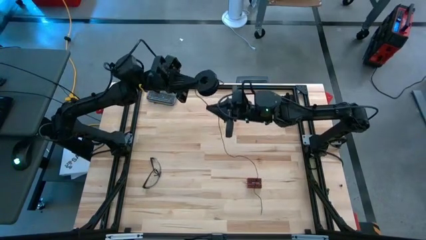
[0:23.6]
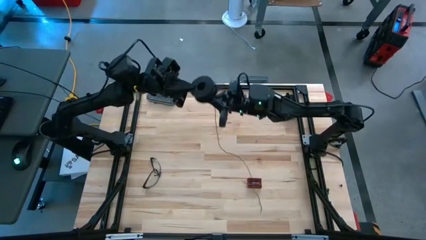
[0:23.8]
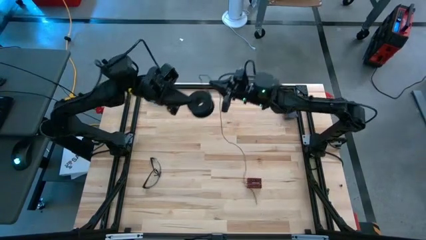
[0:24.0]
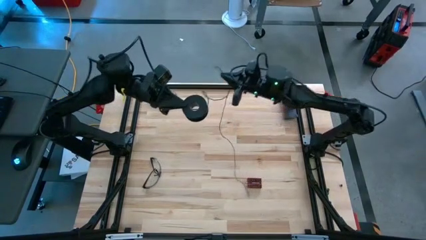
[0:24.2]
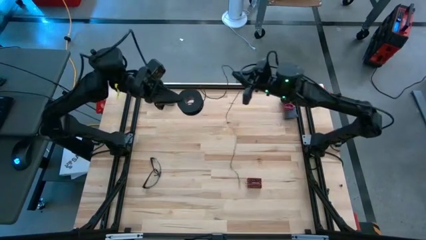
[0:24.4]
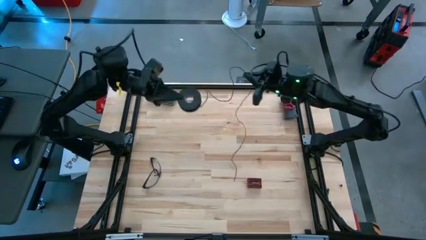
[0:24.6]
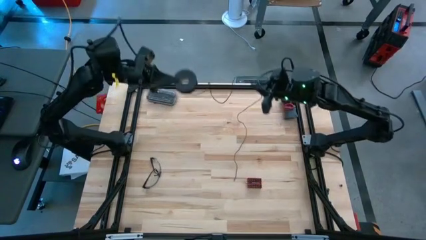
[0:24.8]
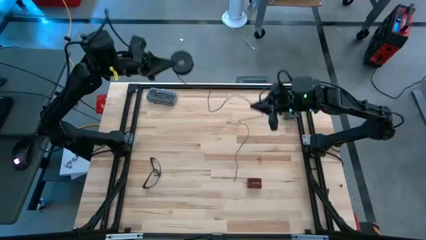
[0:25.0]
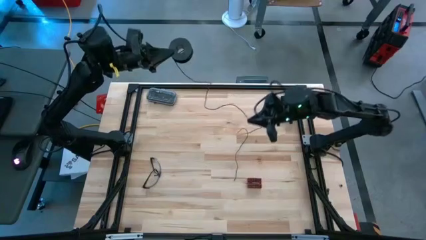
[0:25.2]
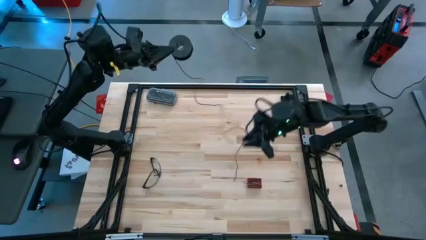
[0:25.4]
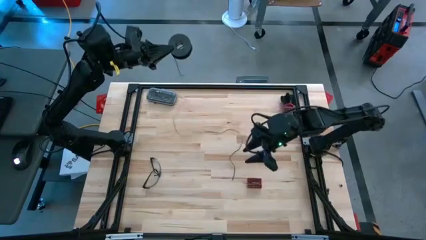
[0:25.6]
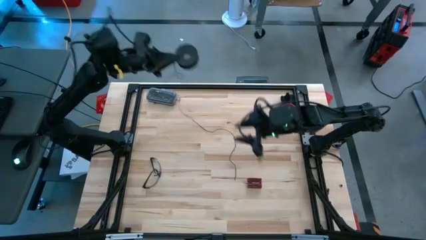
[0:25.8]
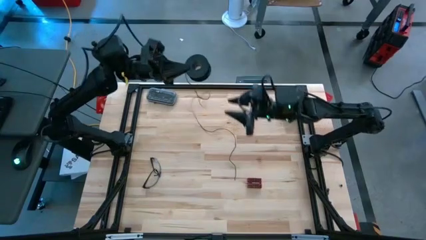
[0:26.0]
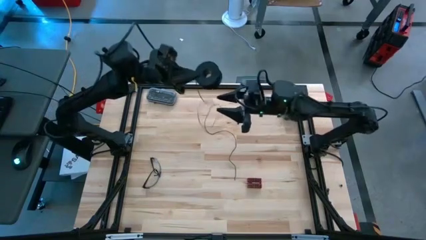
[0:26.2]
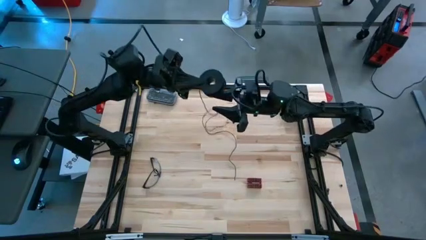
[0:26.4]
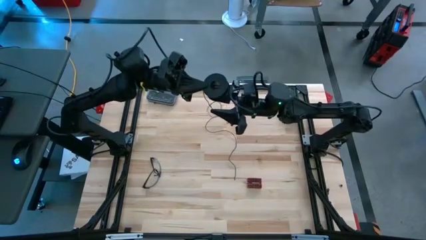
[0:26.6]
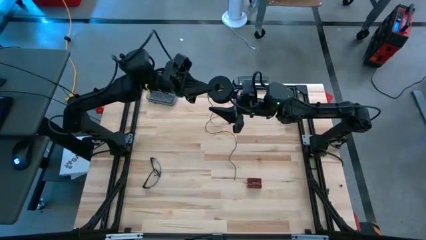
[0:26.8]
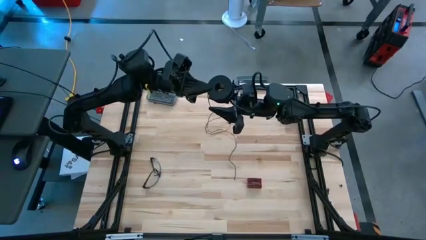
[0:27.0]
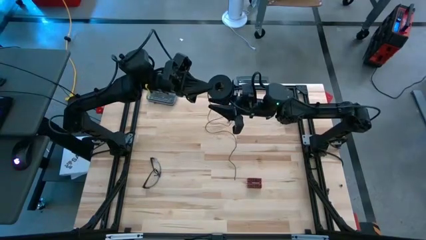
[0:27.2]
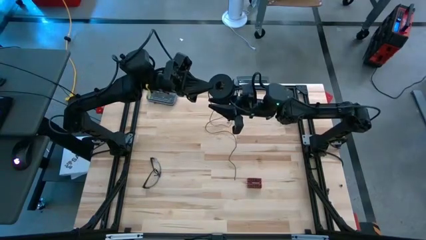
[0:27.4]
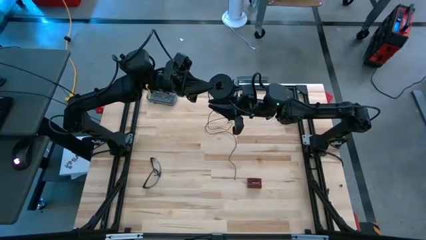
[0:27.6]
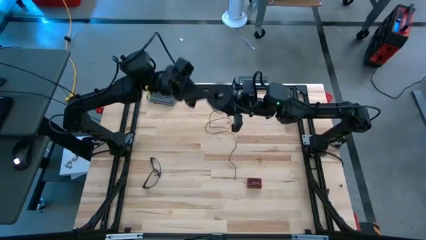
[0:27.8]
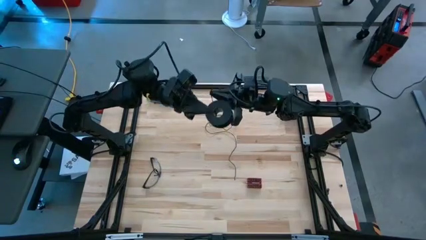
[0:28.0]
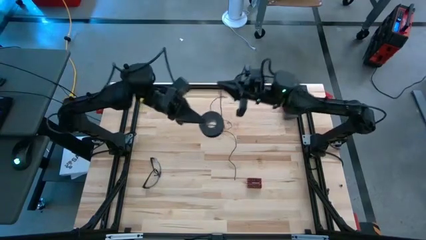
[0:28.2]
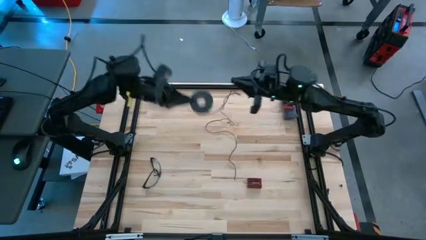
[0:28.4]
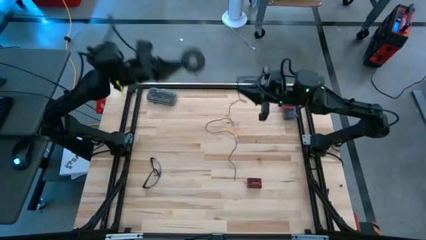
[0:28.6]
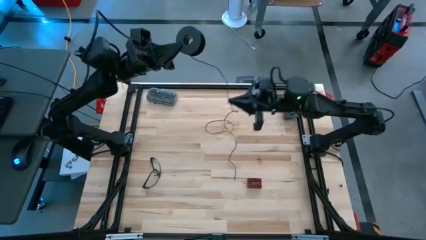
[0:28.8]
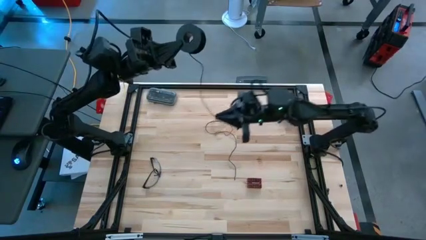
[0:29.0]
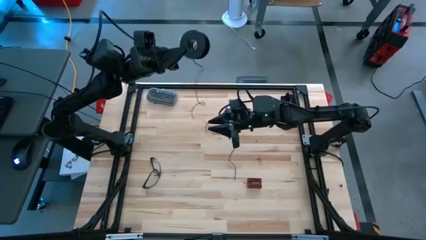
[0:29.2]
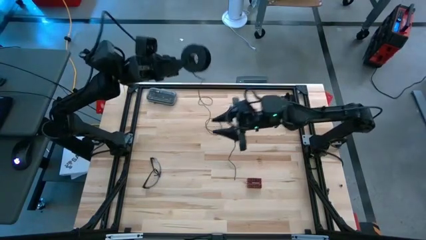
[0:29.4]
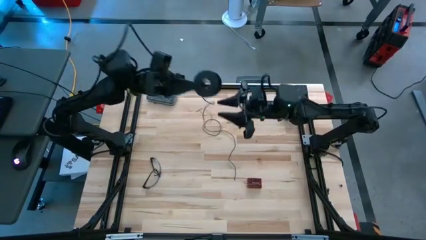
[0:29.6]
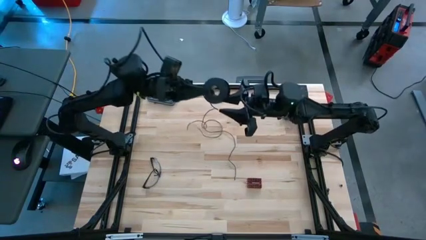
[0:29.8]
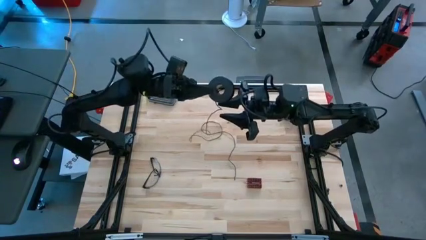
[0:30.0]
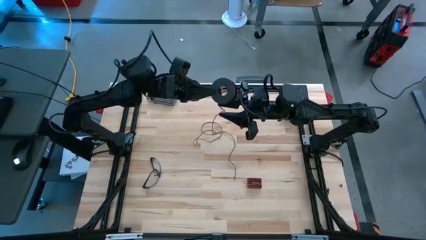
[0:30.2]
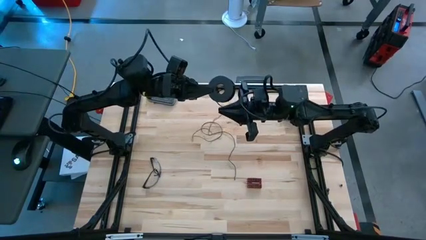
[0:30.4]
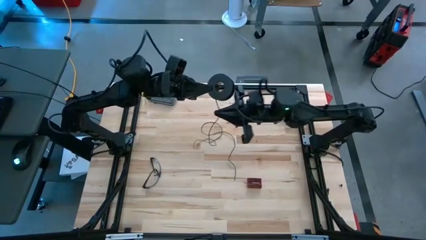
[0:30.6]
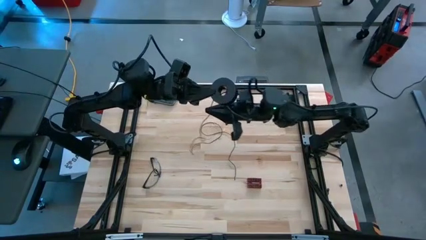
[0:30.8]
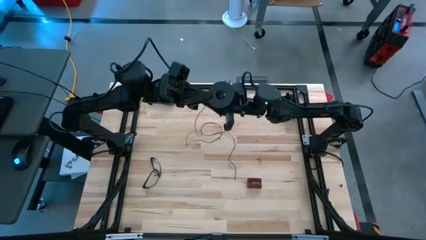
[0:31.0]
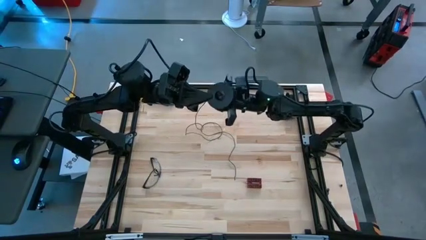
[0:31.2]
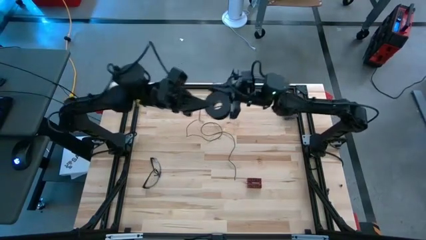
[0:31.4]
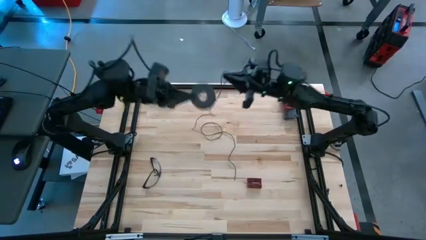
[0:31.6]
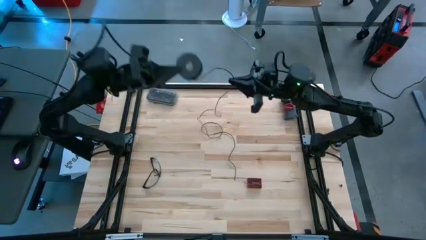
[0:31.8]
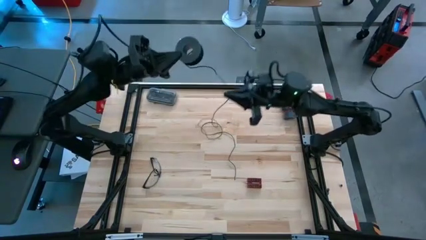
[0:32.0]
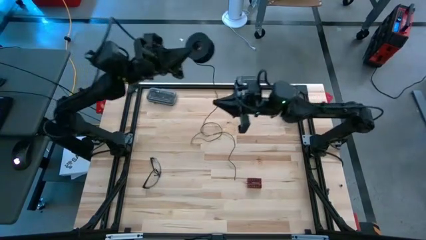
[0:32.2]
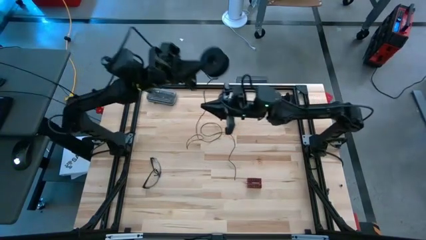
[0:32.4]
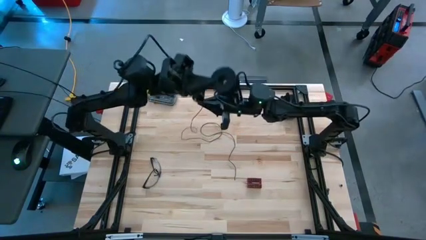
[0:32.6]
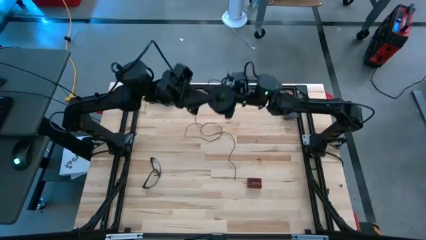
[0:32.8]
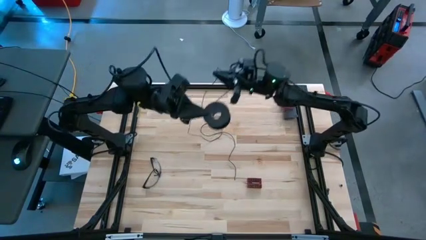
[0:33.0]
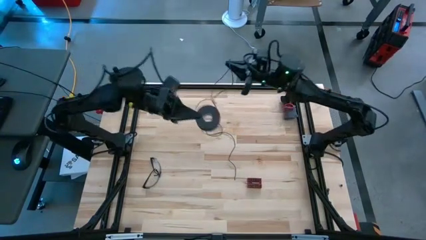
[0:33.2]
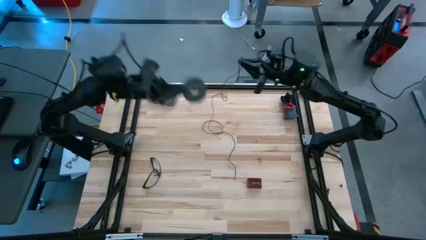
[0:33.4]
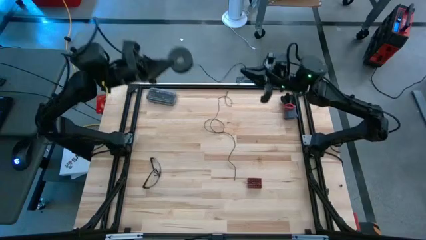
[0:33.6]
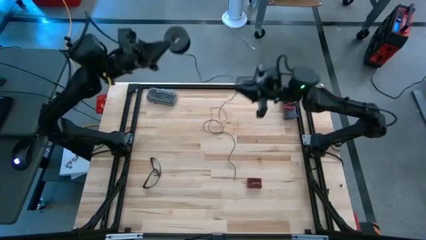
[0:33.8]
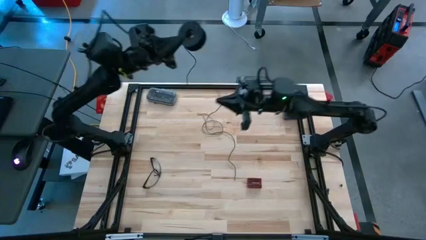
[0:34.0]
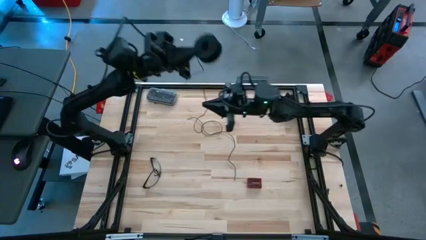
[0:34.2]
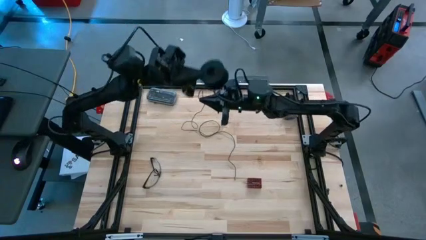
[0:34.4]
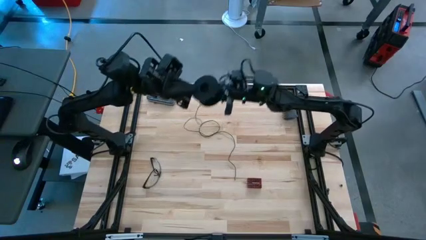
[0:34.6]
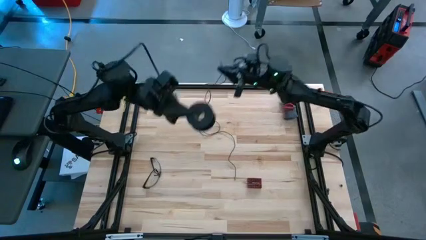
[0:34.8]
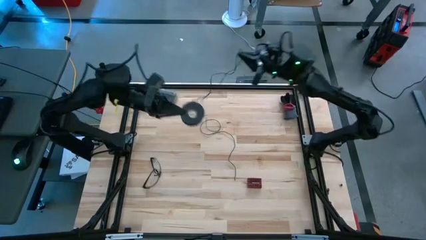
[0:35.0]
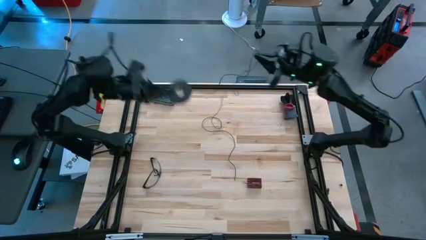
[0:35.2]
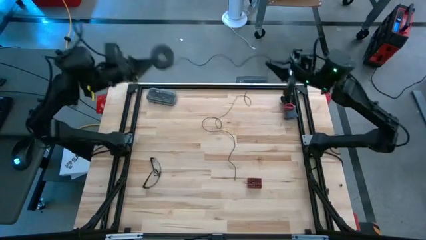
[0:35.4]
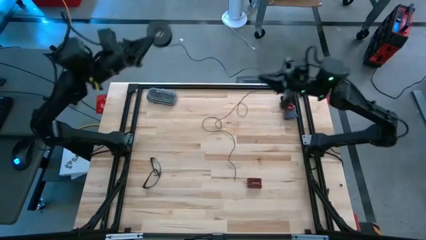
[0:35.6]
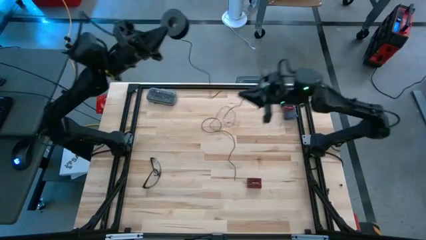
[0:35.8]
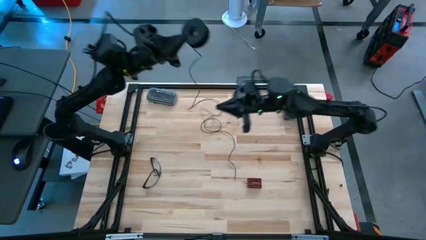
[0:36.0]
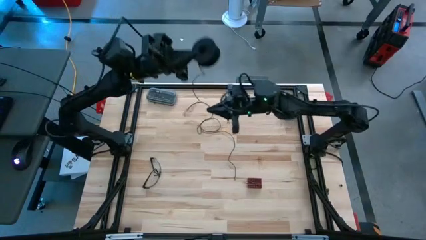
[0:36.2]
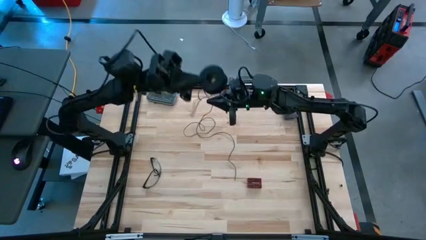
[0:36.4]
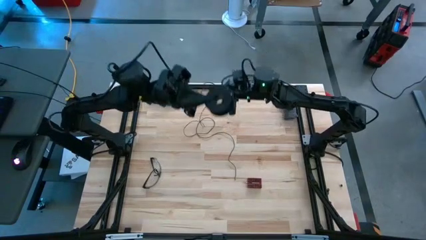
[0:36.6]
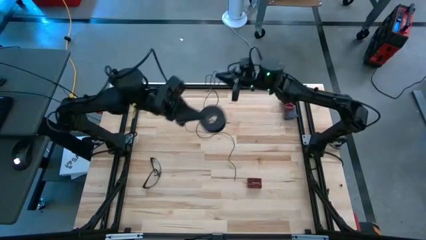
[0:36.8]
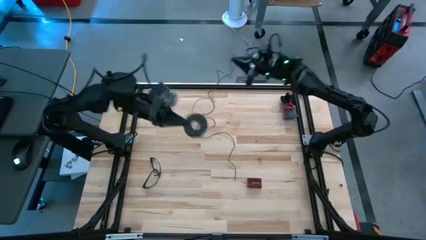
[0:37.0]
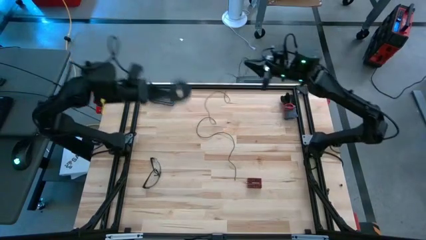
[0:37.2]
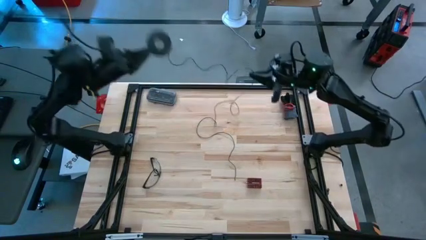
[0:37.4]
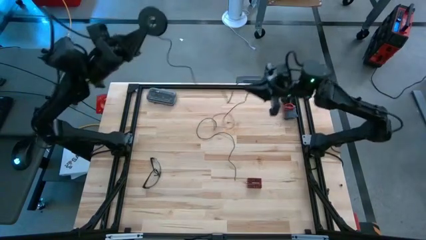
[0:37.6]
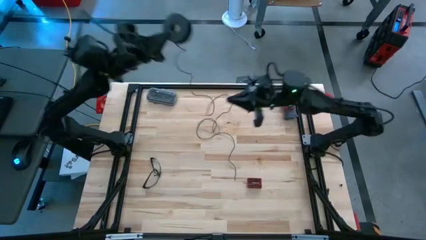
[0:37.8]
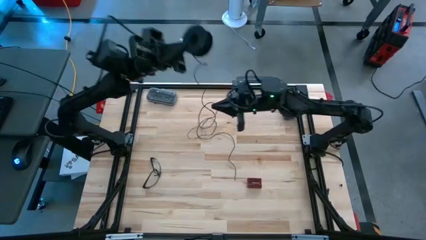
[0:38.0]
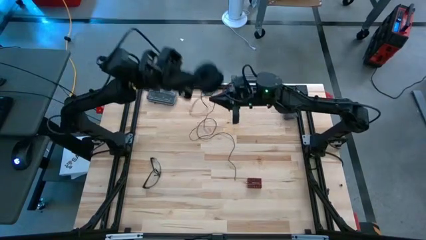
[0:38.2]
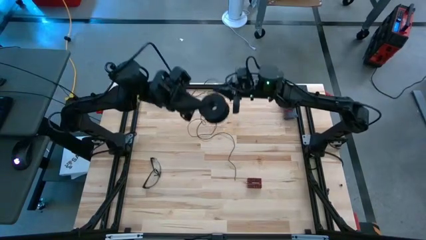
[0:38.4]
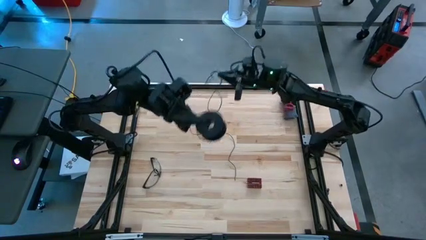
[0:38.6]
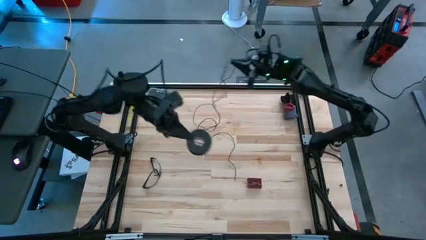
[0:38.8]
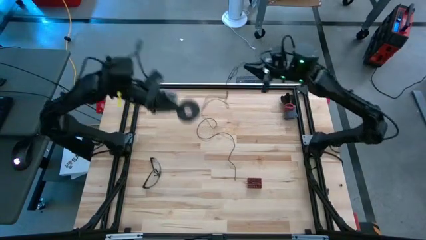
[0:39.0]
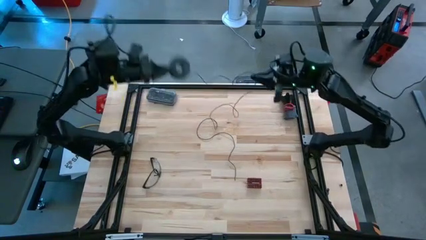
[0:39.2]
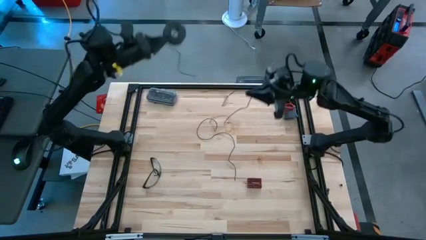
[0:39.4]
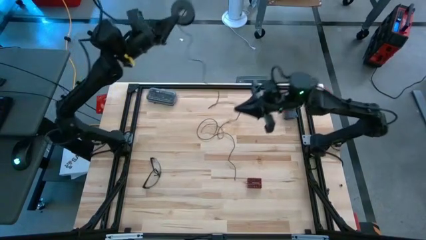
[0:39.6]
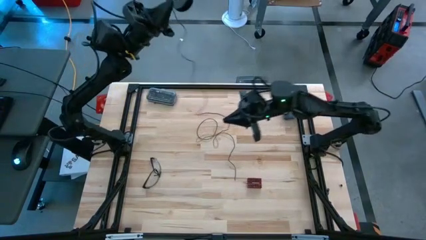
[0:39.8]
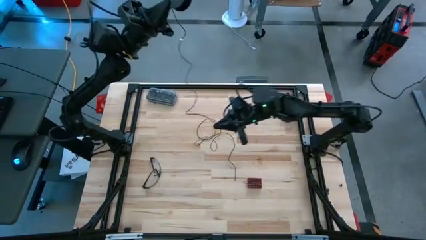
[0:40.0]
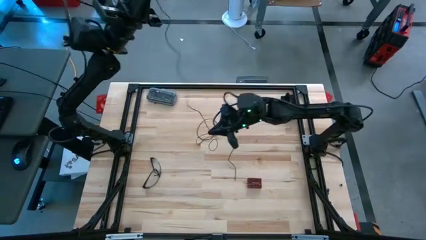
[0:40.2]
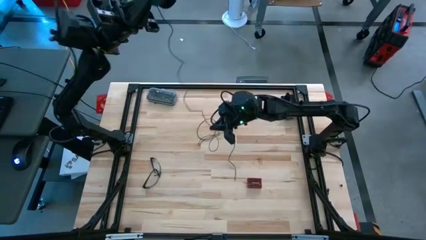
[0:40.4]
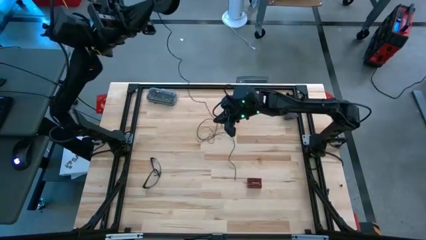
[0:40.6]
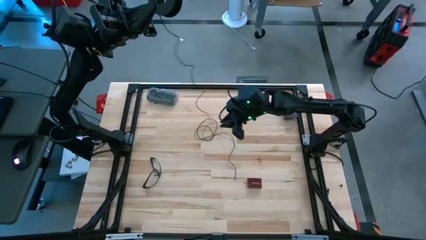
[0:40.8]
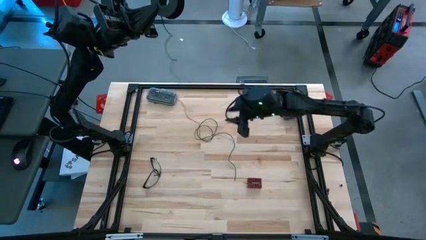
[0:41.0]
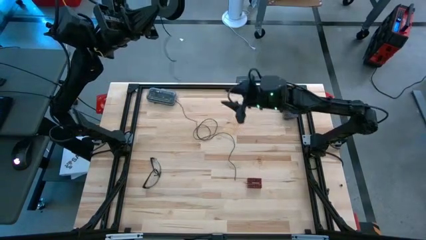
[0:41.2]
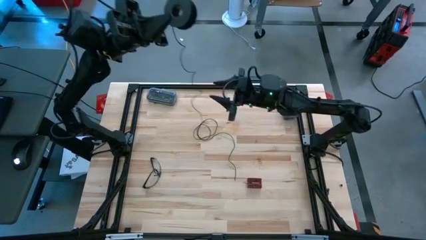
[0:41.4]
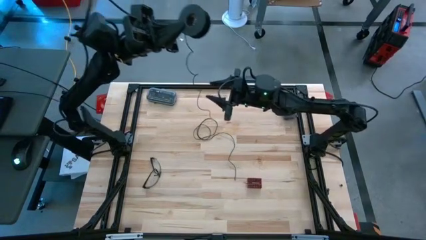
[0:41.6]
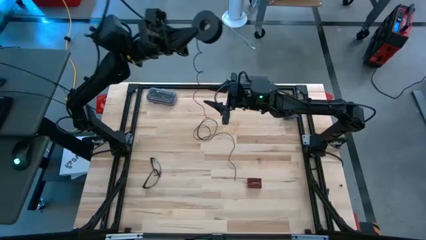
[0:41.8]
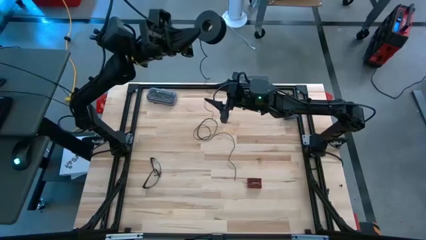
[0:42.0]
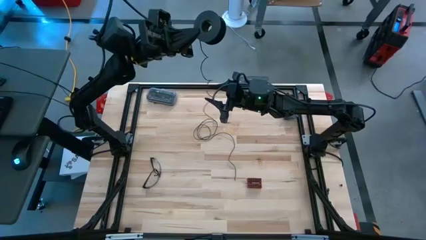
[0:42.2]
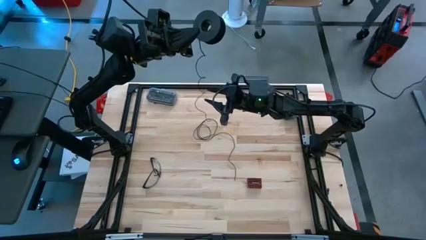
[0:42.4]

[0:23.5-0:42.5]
Task: Coil cords
Uncoil the black wire from the spool
